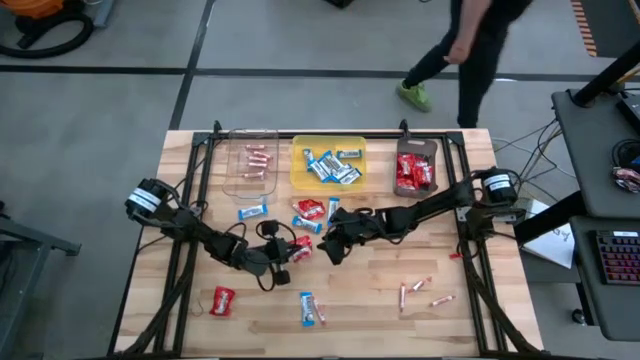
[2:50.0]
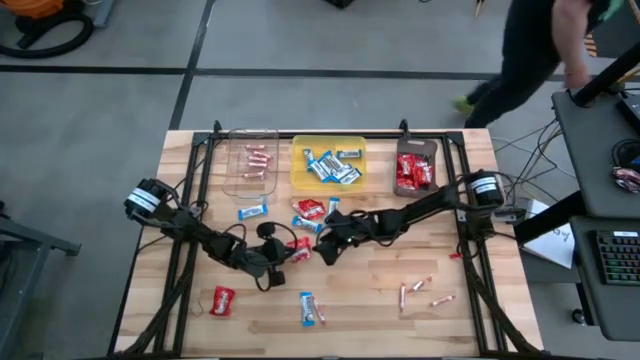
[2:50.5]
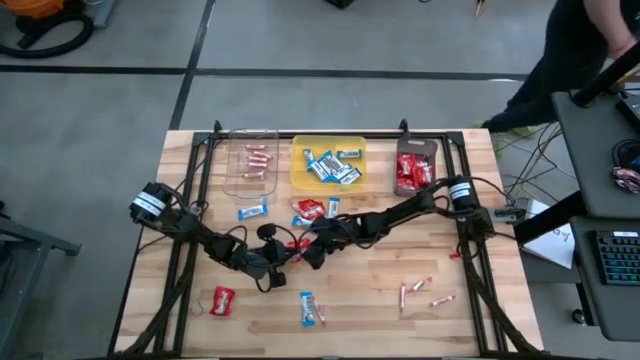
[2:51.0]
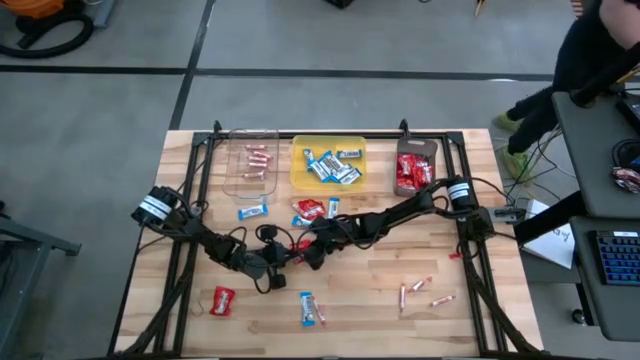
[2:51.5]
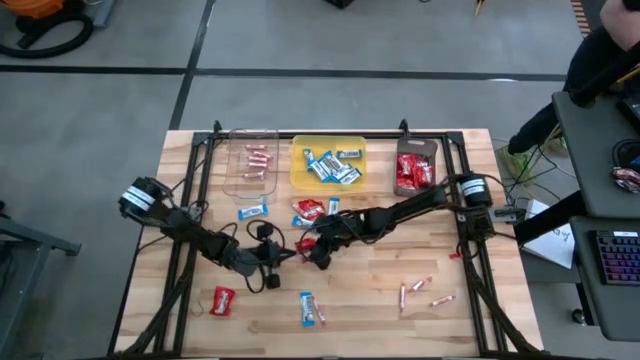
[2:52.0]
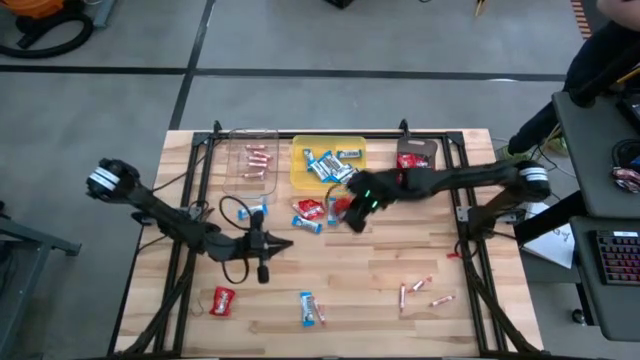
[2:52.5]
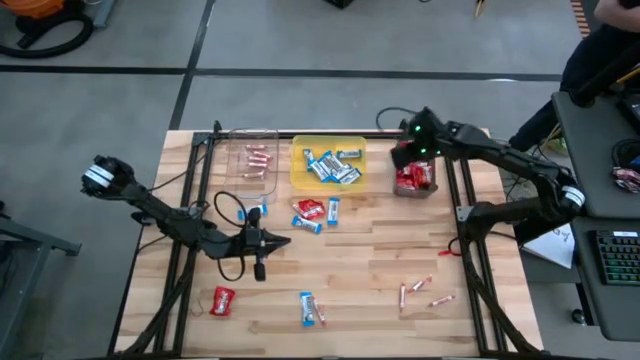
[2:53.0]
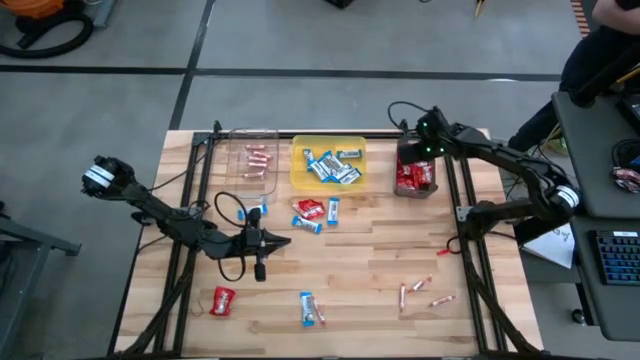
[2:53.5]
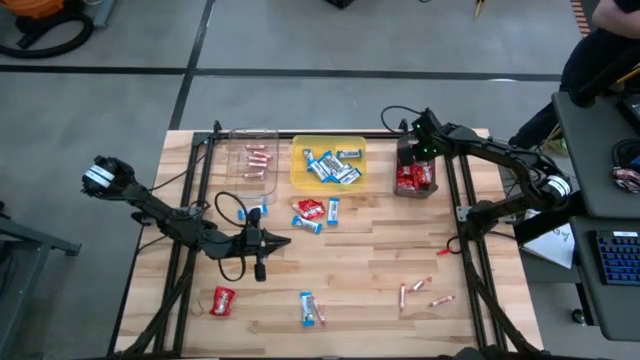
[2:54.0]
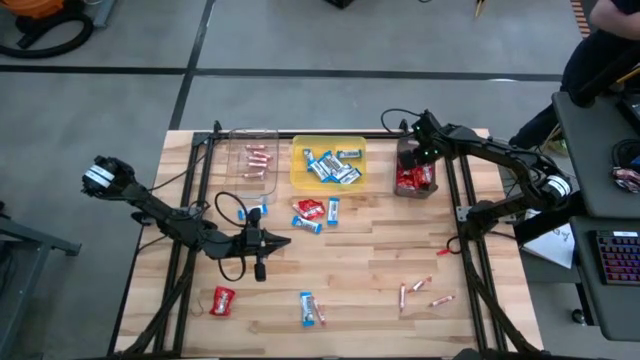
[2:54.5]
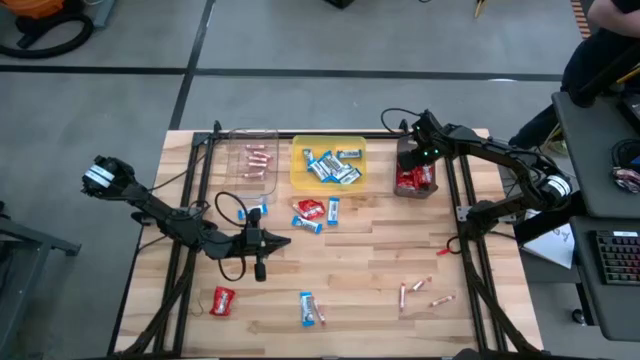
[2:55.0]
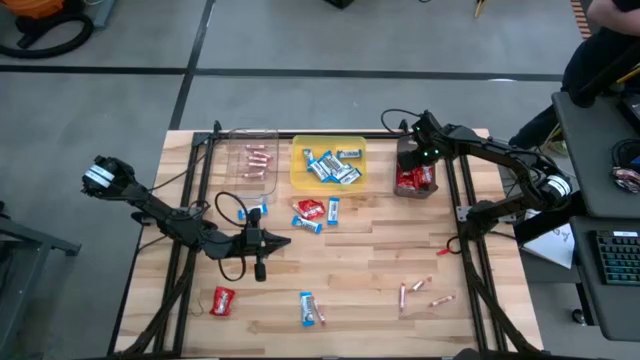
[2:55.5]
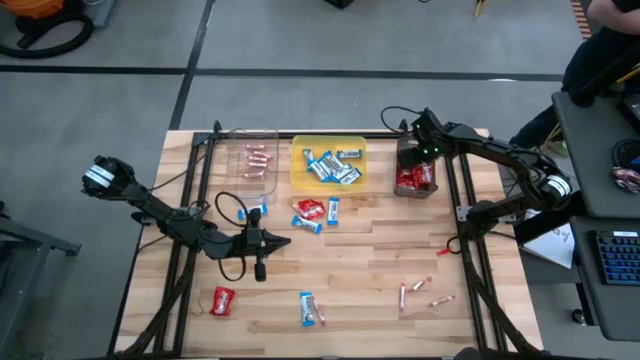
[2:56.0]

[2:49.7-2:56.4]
Task: Sort candy
Put the red candy into the black bin

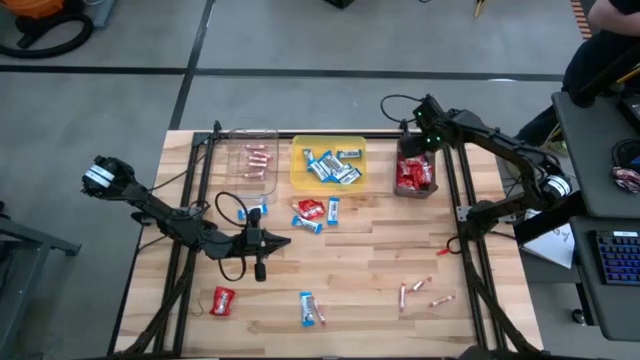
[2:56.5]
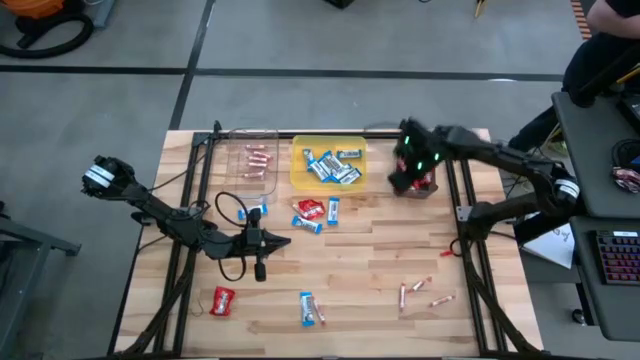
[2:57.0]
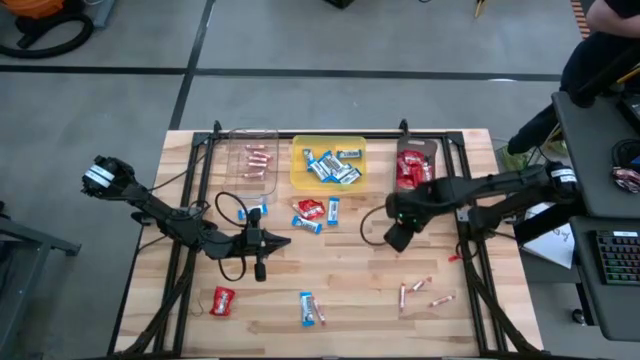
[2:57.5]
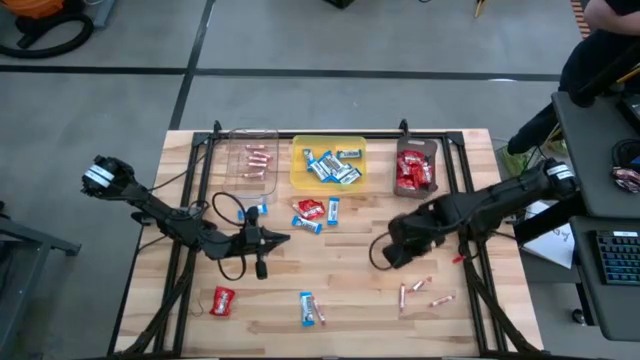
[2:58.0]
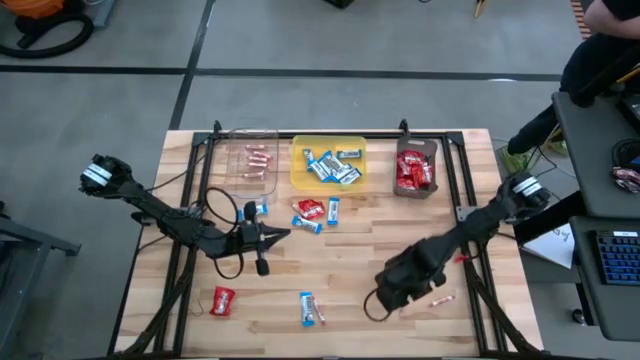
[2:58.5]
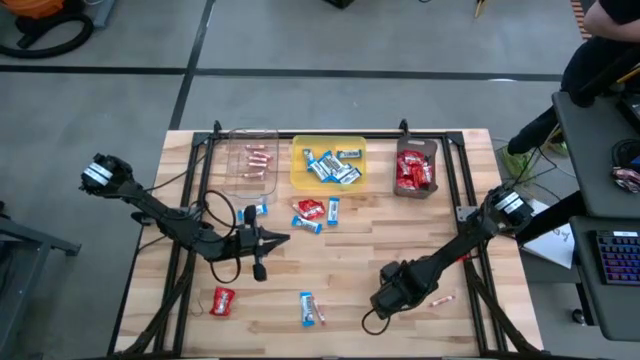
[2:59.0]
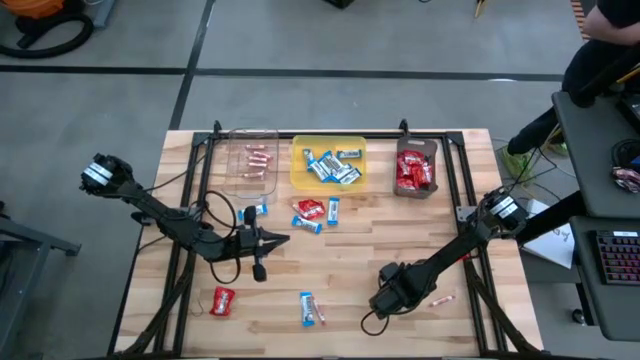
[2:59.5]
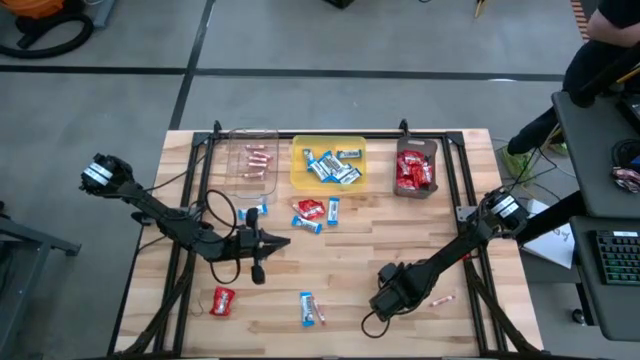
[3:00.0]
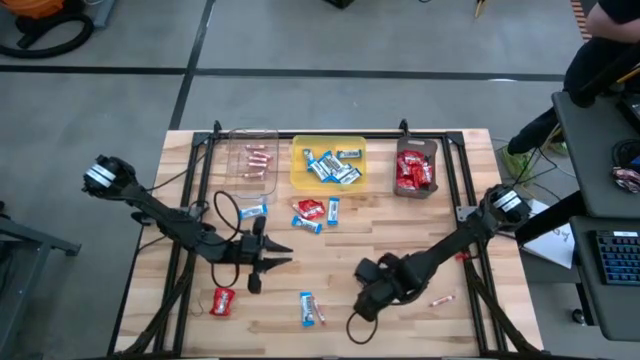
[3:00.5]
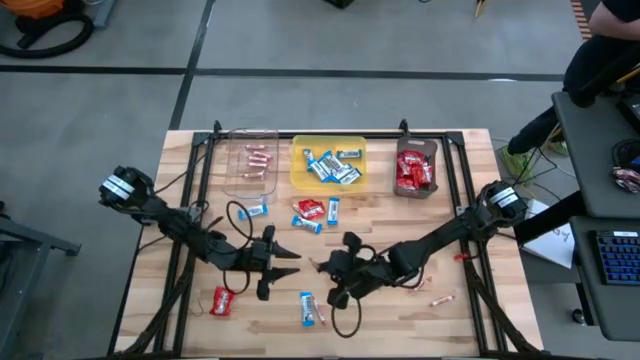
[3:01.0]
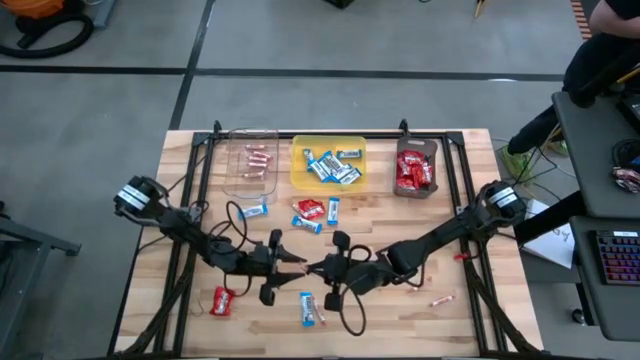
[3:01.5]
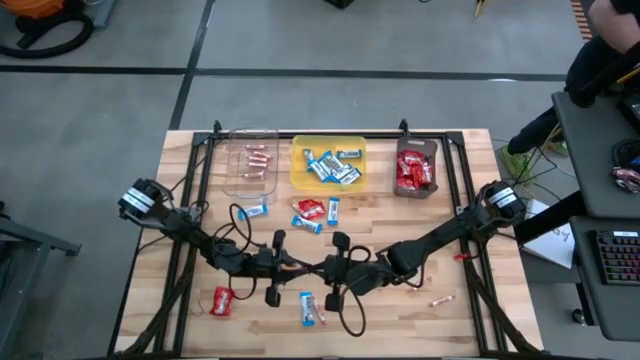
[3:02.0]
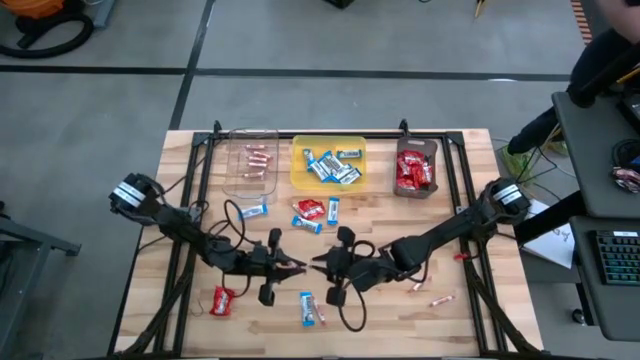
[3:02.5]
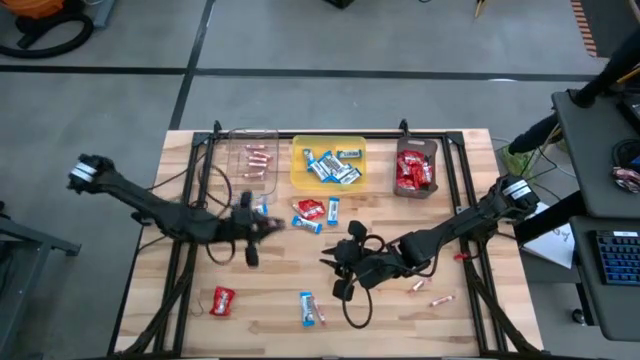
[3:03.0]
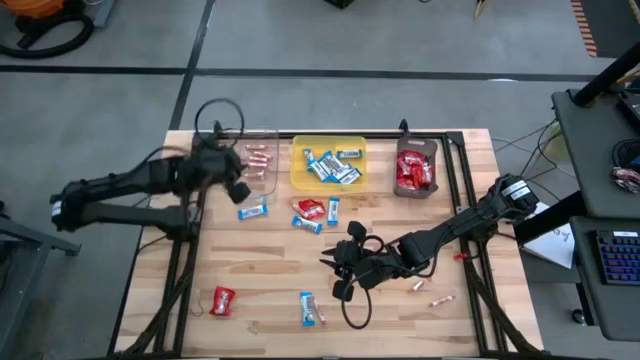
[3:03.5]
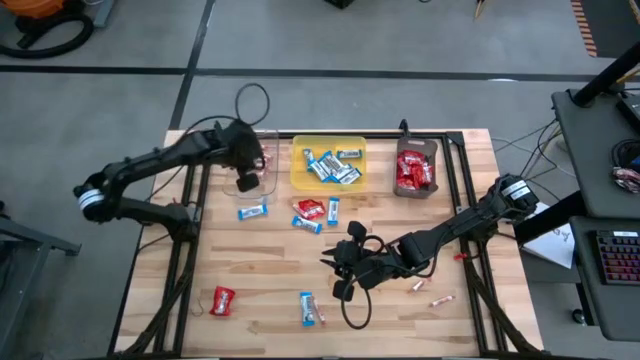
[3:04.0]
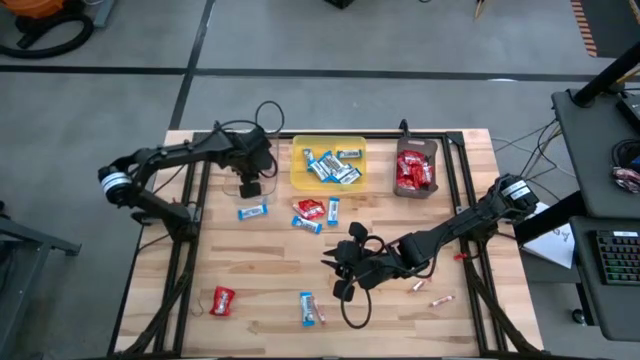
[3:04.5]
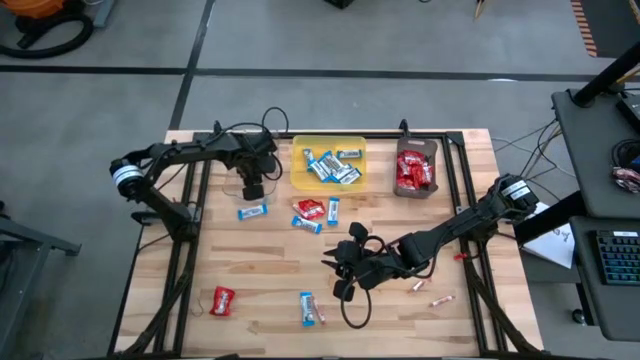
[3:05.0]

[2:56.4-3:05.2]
Put the orange candy into the transparent bin

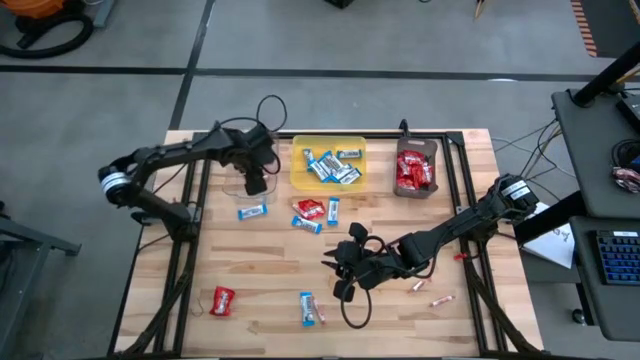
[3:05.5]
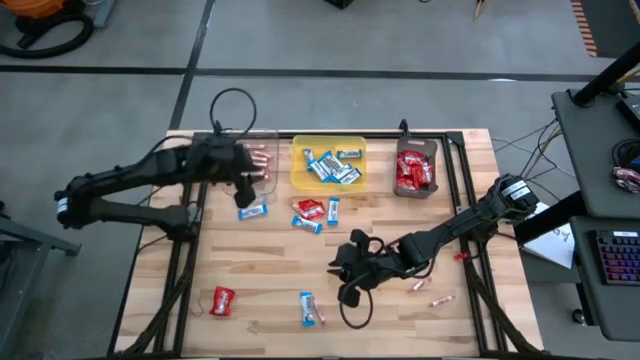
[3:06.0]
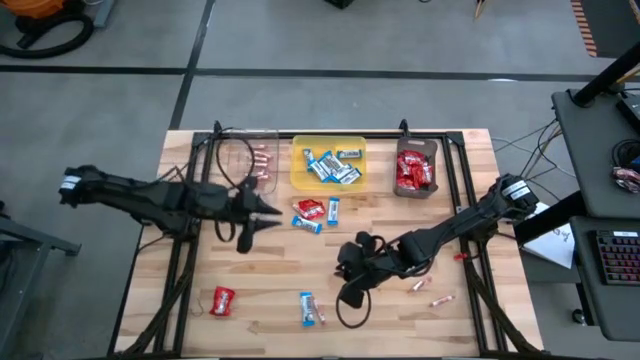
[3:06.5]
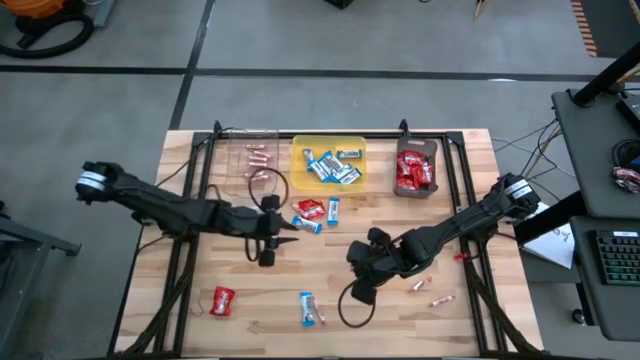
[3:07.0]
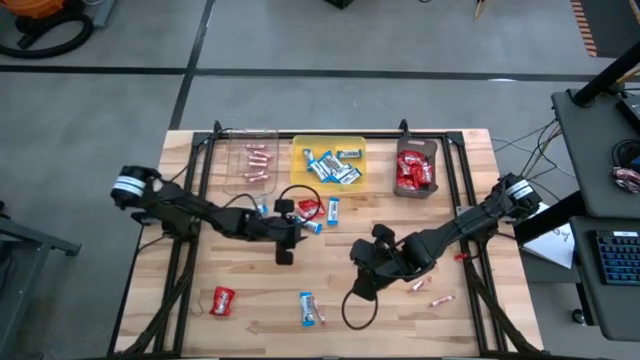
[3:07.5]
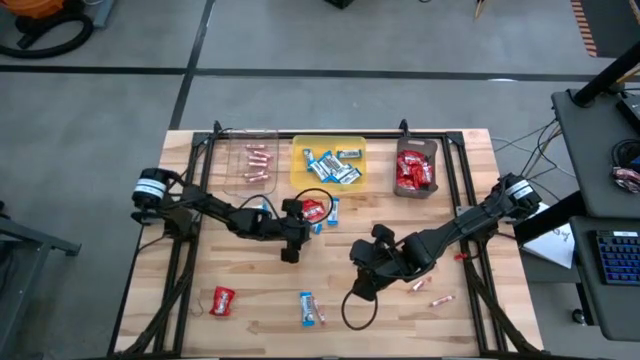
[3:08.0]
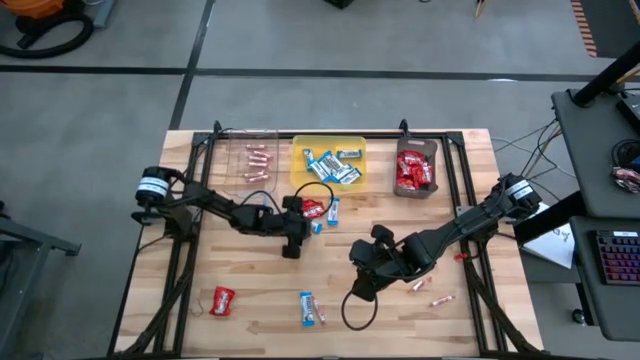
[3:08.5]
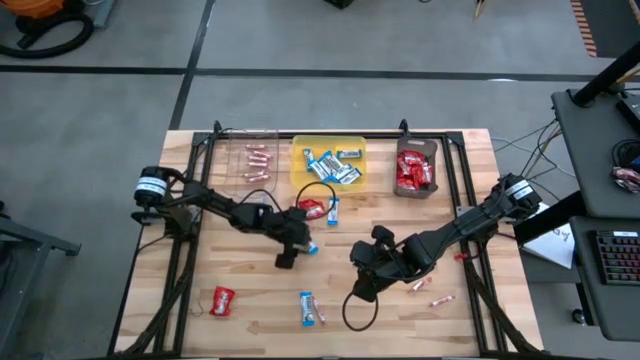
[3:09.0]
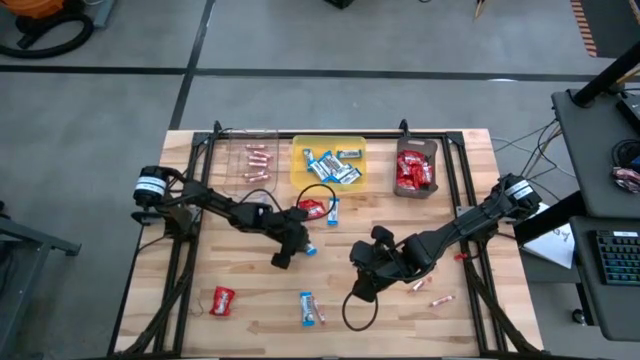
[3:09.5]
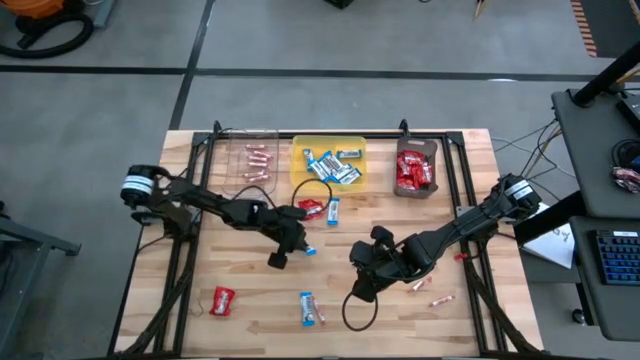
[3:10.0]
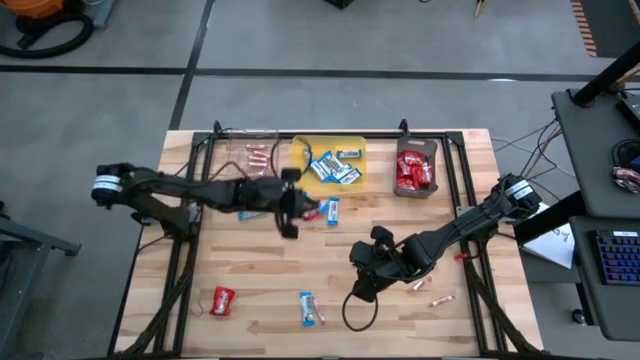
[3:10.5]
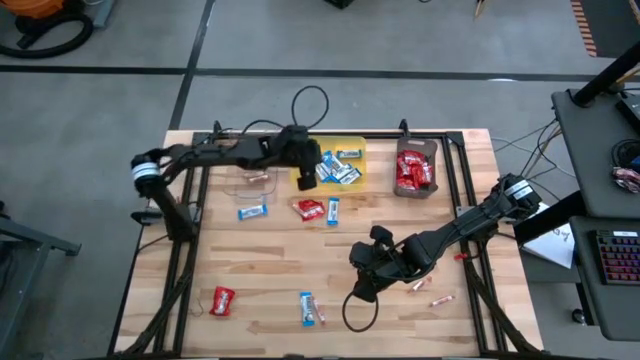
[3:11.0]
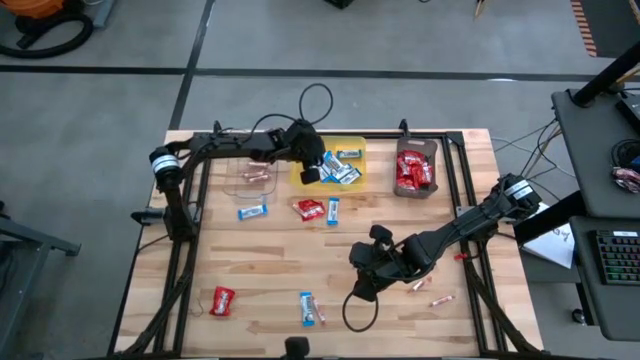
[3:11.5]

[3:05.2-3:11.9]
Put the white chocolate into the yellow bin

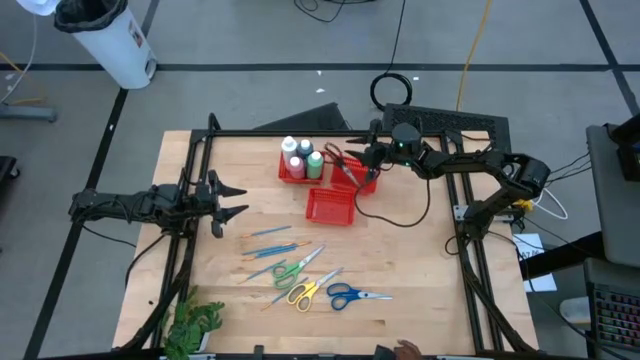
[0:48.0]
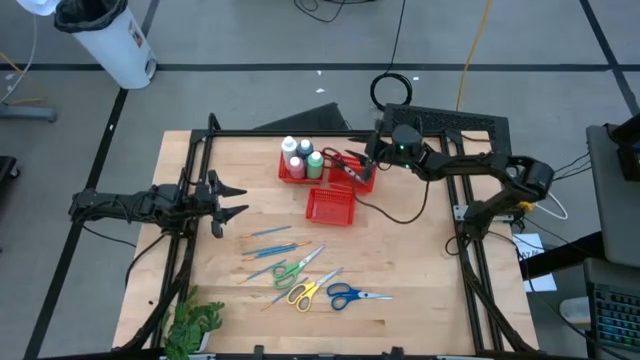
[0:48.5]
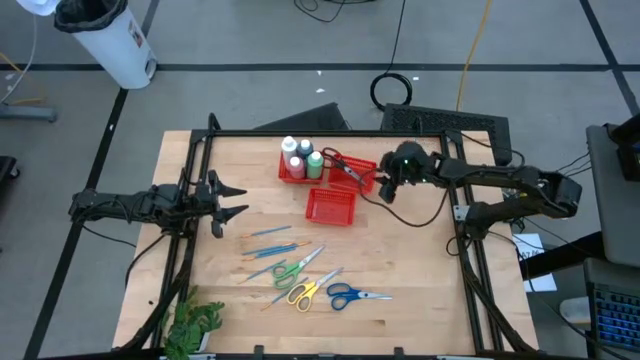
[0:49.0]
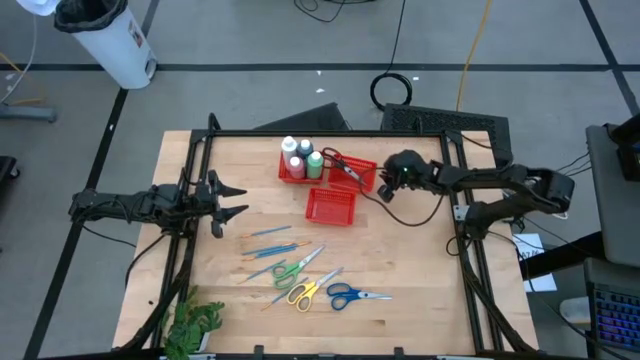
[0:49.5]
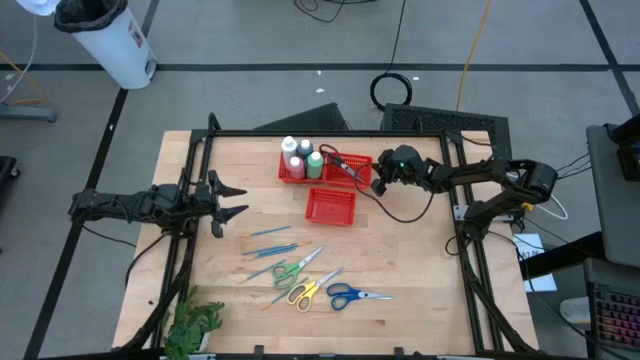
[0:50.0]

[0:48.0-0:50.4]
Task: Pick & Place Paint Supplies
Adjust the top right red bin
